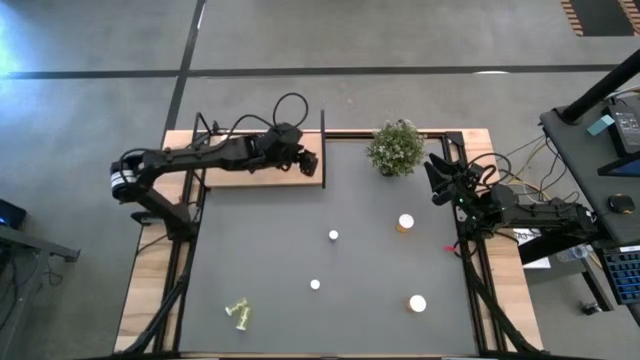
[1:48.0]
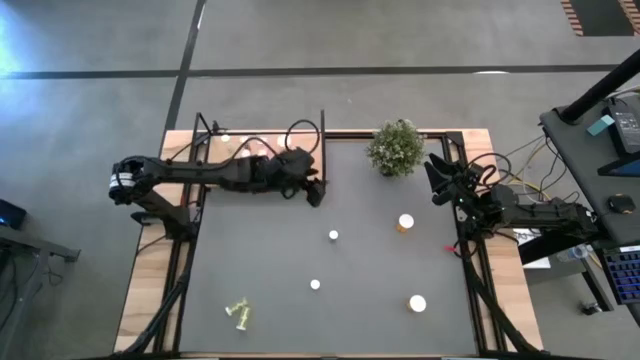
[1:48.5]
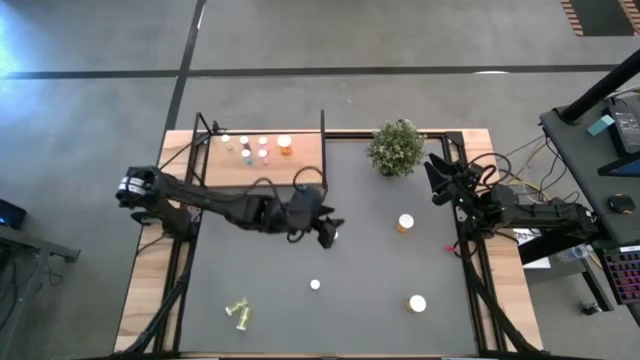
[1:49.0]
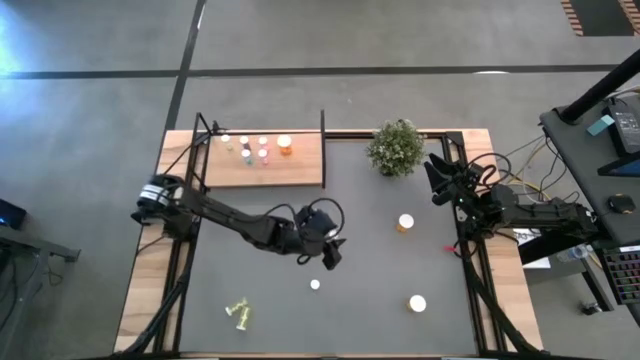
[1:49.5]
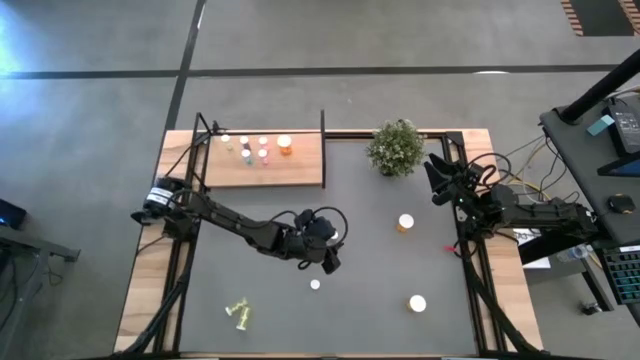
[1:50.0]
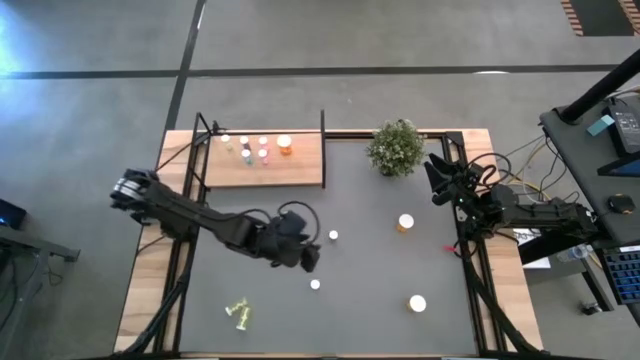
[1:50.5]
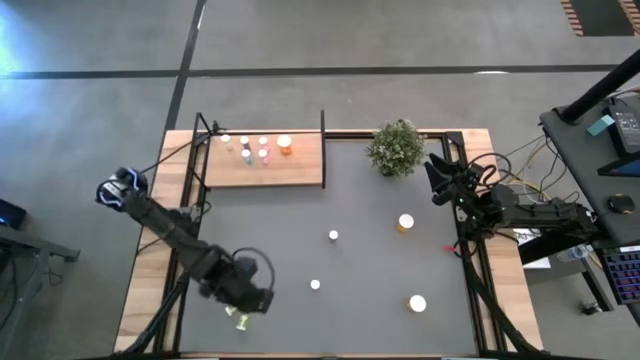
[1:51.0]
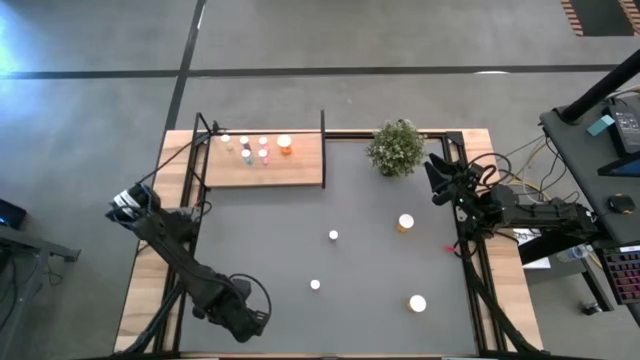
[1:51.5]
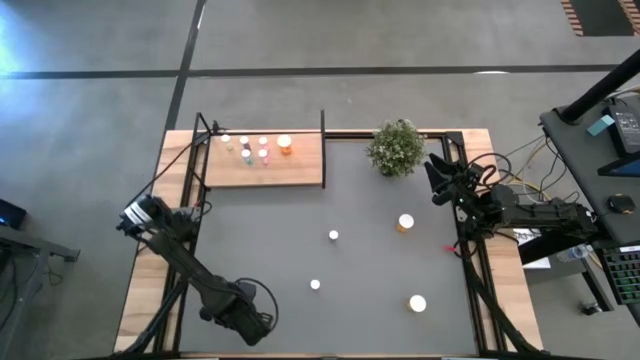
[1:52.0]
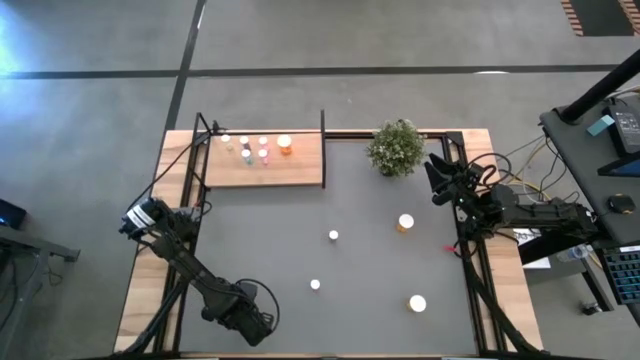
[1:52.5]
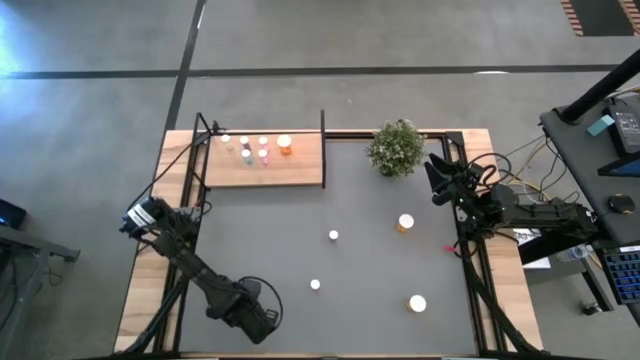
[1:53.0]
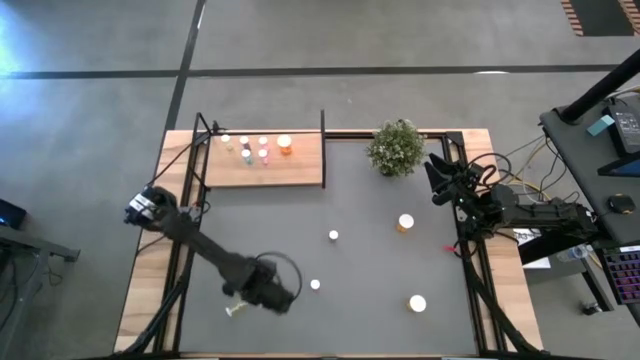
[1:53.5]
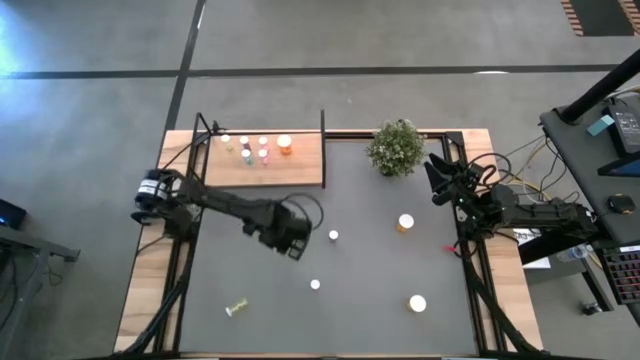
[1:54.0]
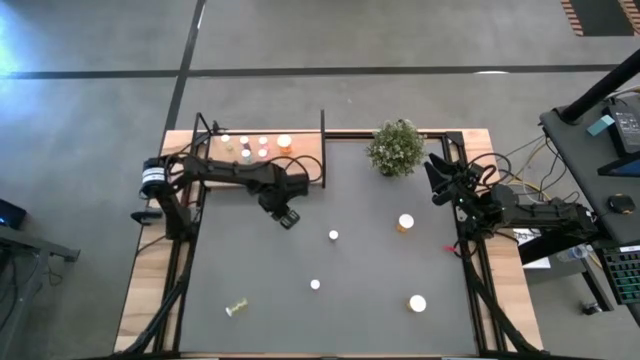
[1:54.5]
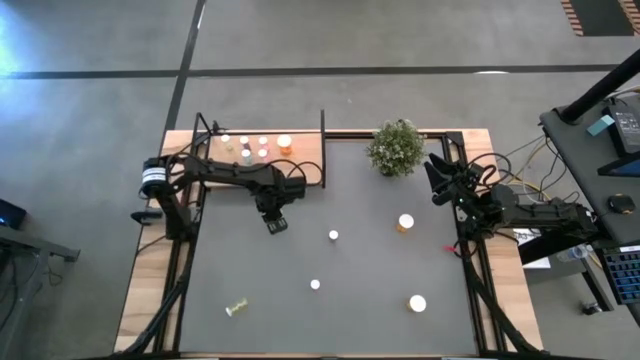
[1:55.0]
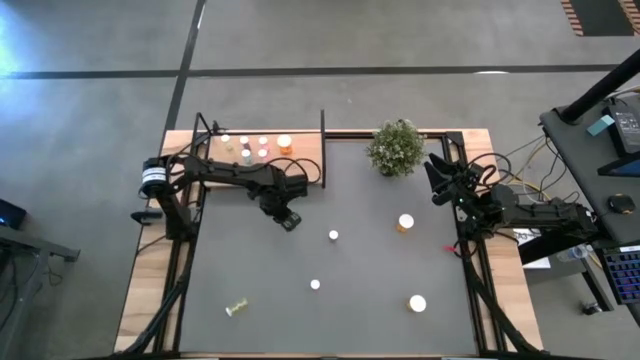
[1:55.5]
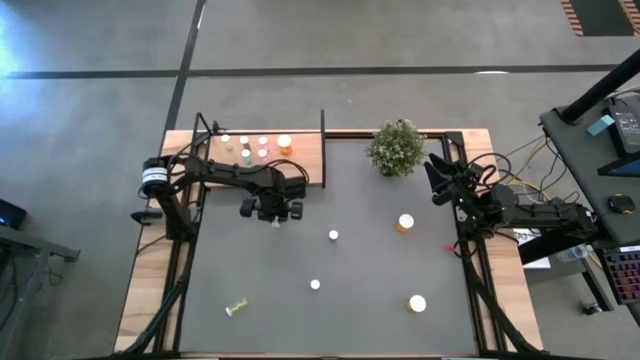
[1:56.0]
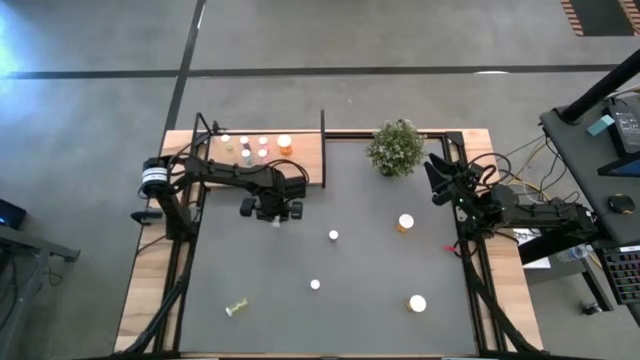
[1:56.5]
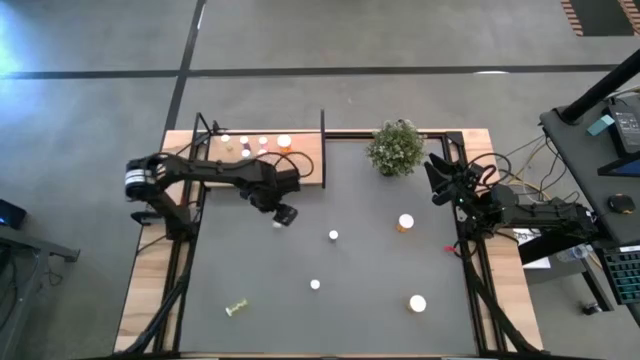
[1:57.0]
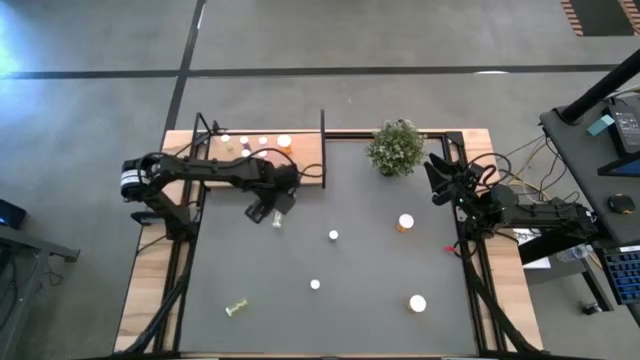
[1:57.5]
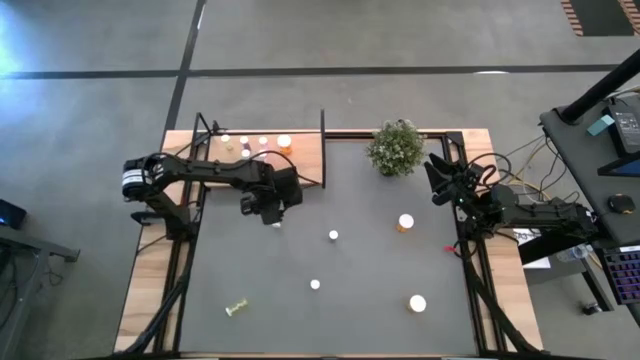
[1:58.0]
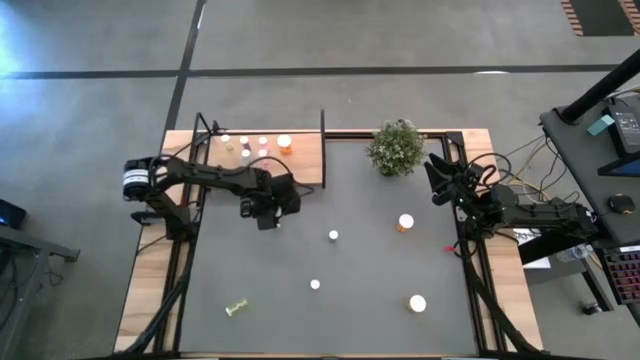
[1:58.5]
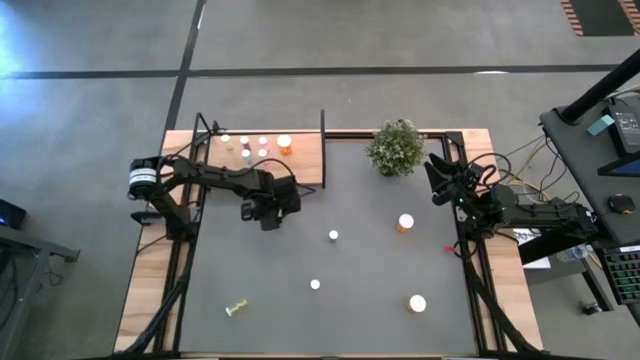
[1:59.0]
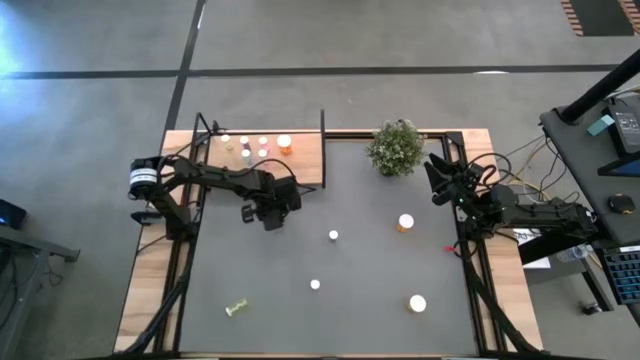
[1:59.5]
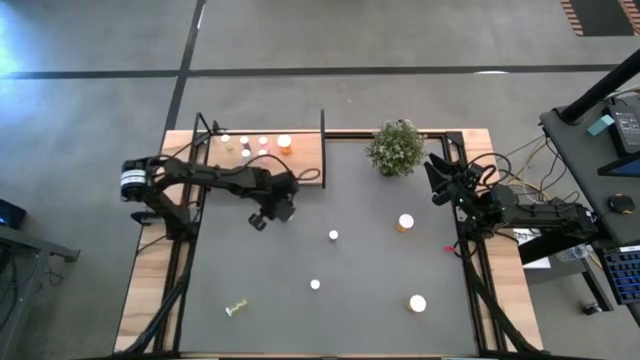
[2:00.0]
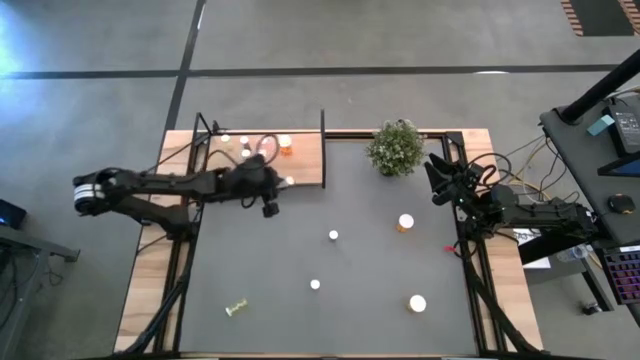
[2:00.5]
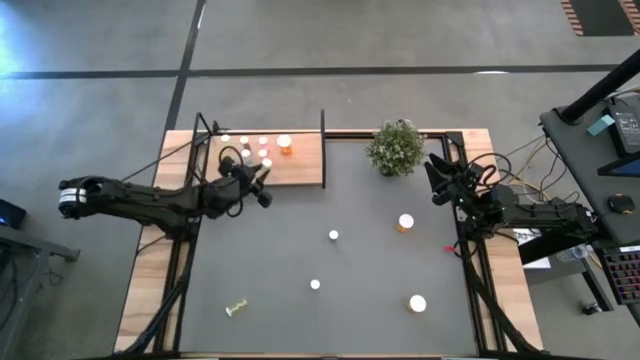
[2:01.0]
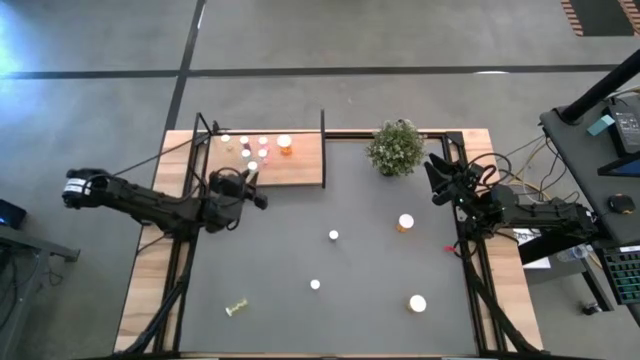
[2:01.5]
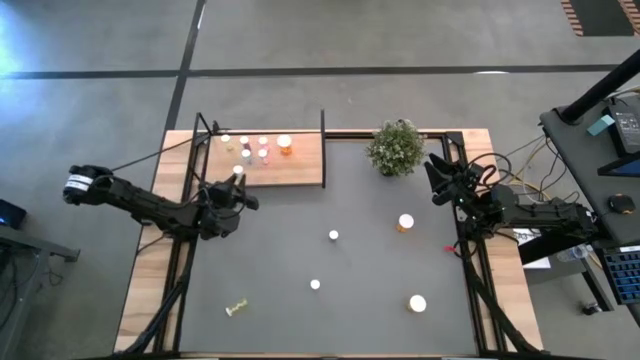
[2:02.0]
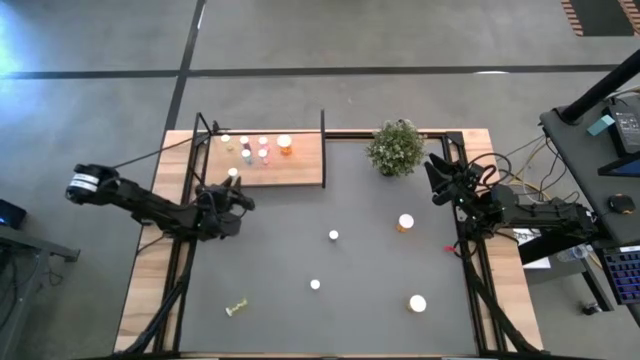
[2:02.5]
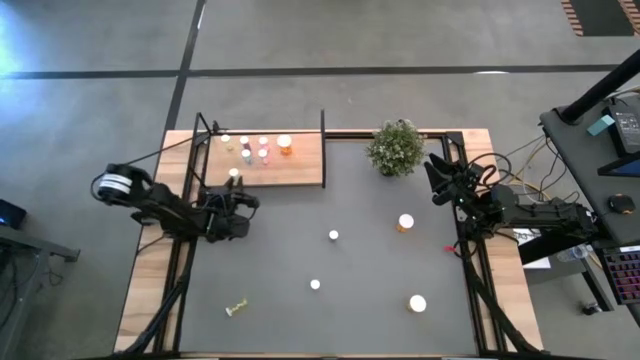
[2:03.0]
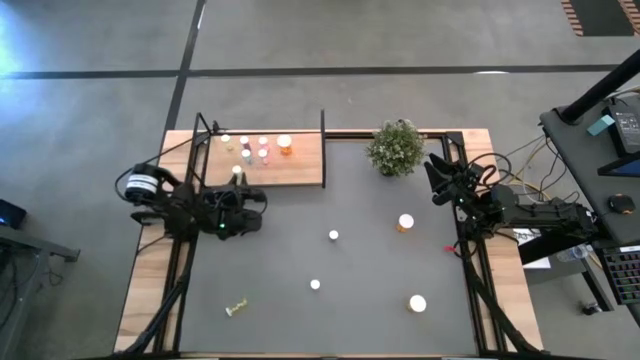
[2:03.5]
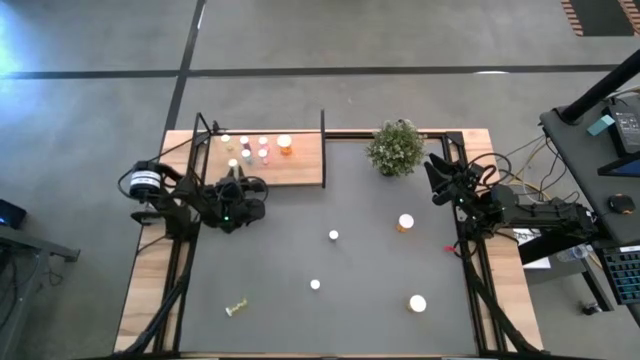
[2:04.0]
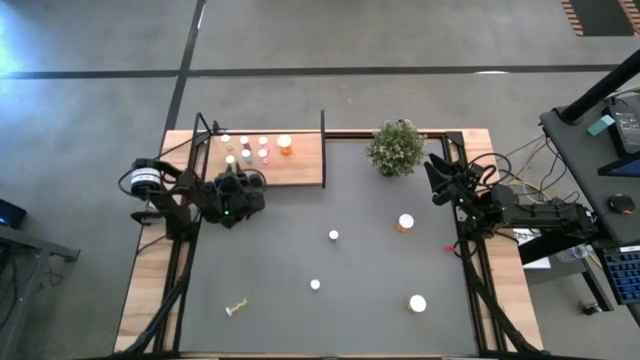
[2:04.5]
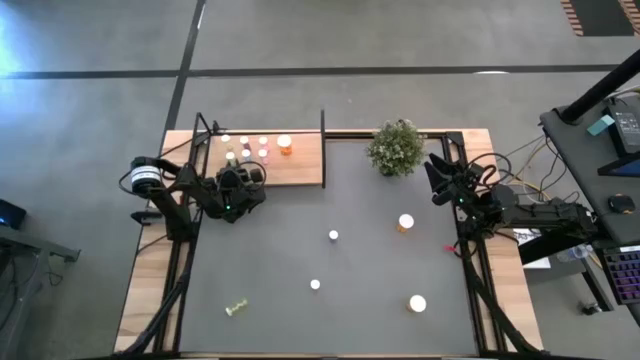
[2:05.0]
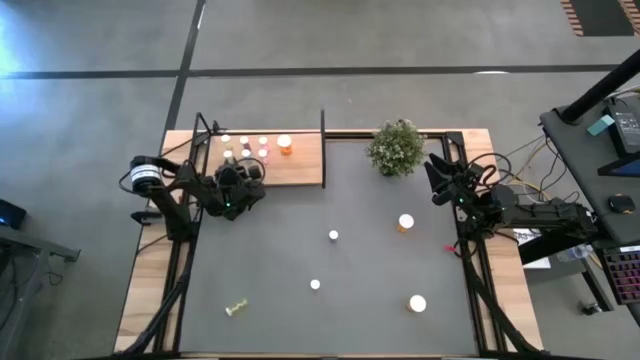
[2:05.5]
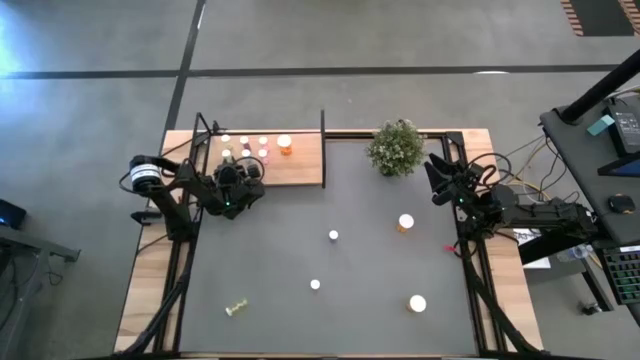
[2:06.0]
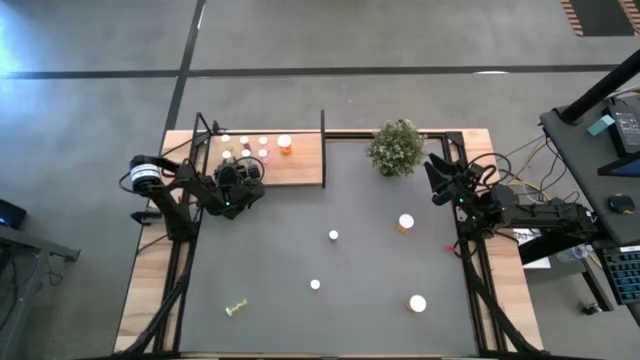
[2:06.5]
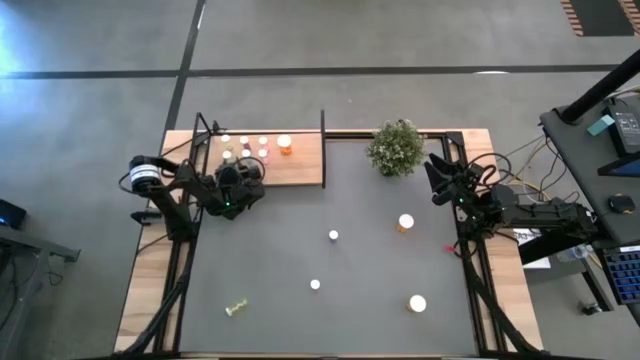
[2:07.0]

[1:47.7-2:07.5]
Task: Pick and place medicine bottles onto shelf by color
Put the right yellow pill bottle on the shelf aligned with the other yellow pill bottle
